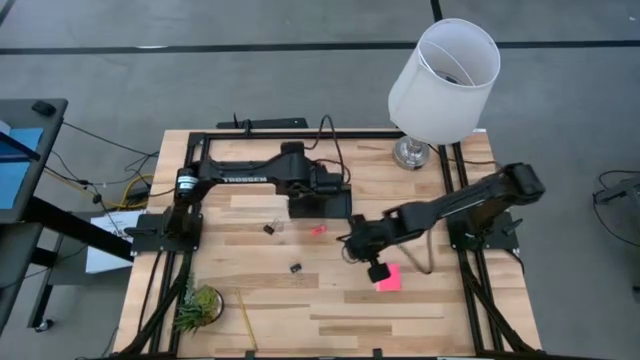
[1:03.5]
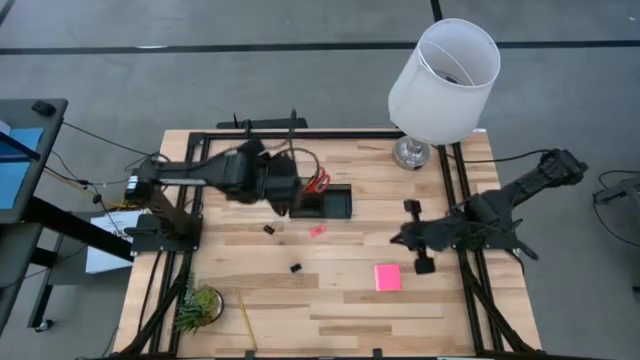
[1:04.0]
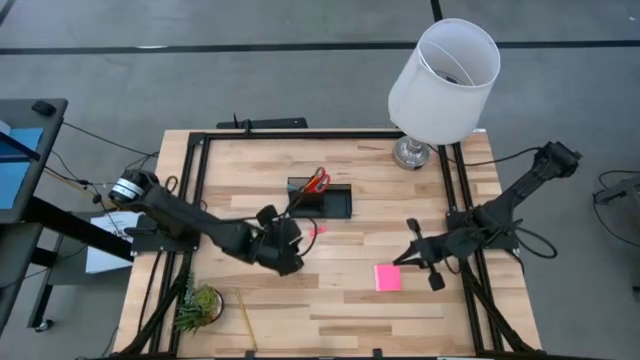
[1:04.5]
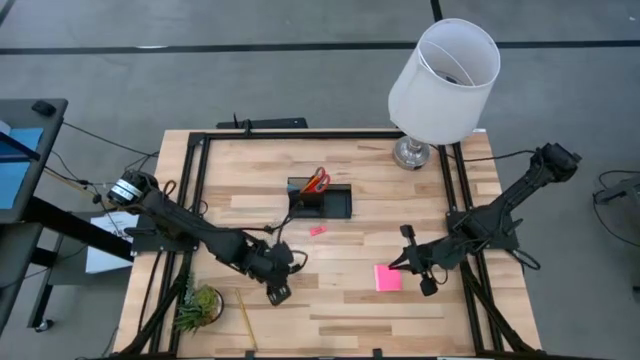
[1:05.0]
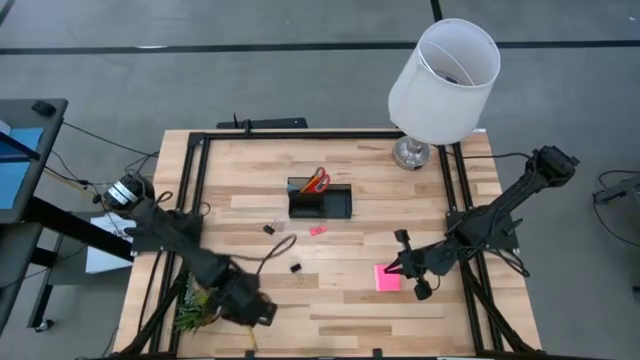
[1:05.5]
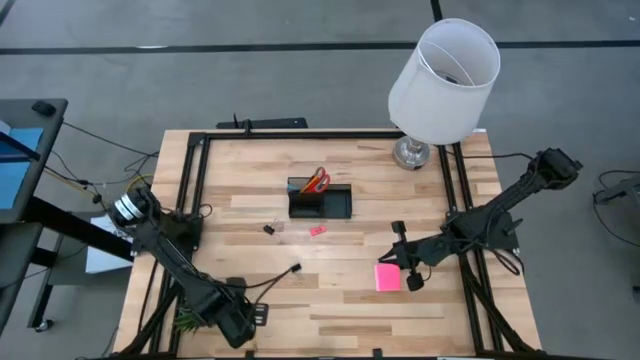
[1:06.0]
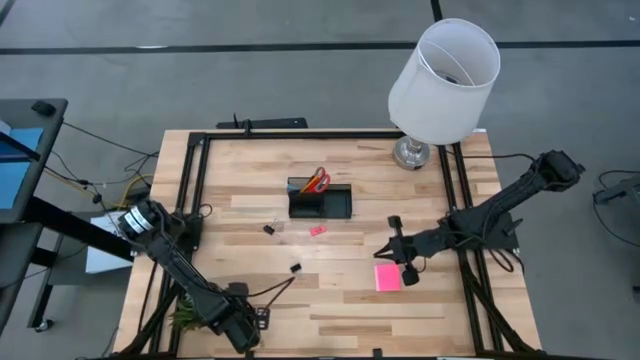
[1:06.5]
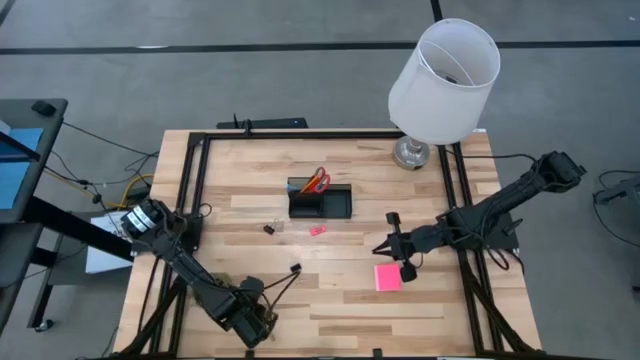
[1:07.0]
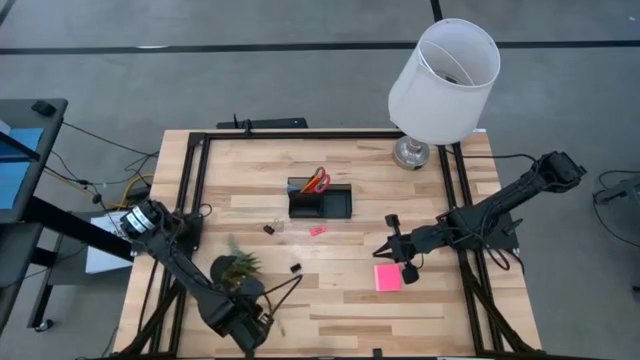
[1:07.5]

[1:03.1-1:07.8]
Task: Pick and place office supplies into organizer
Put the yellow pencil into the top left compartment of the black desk organizer

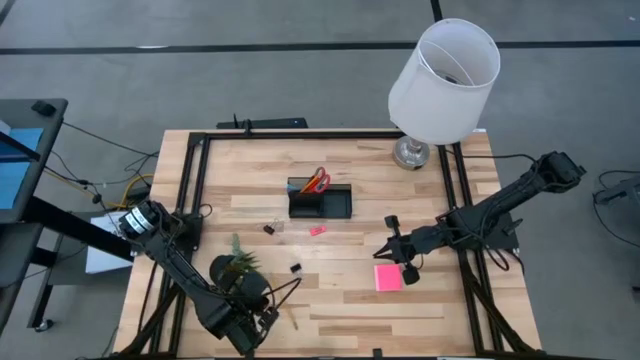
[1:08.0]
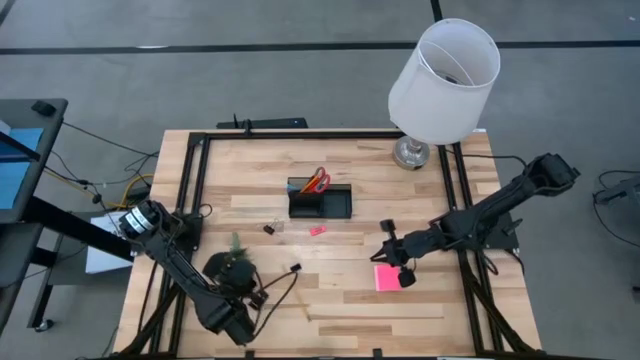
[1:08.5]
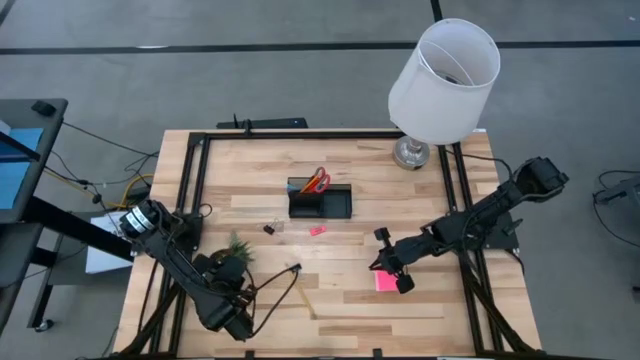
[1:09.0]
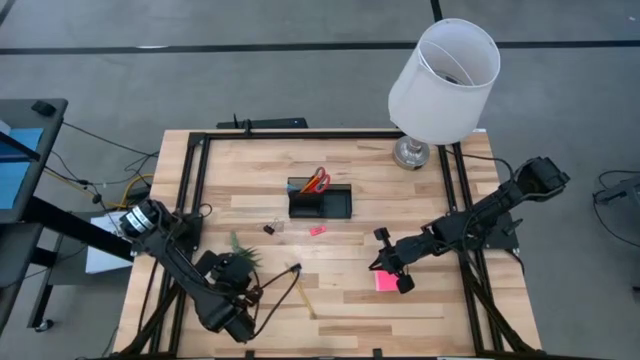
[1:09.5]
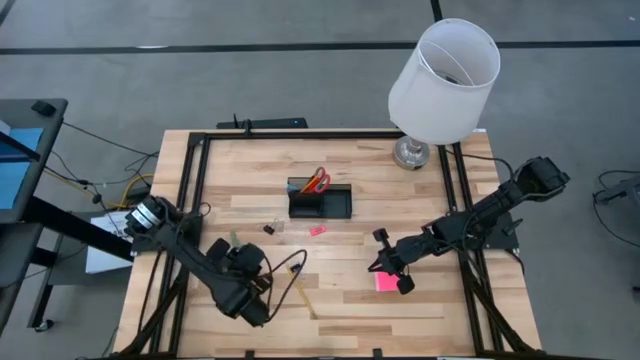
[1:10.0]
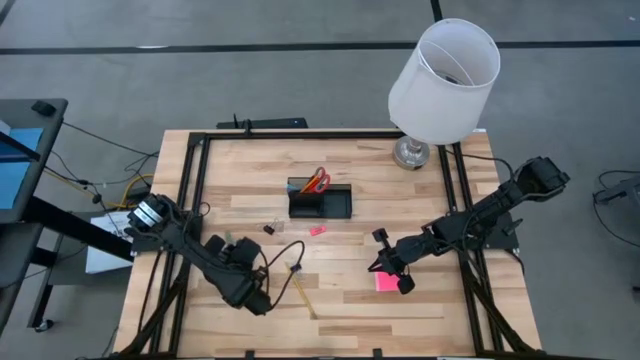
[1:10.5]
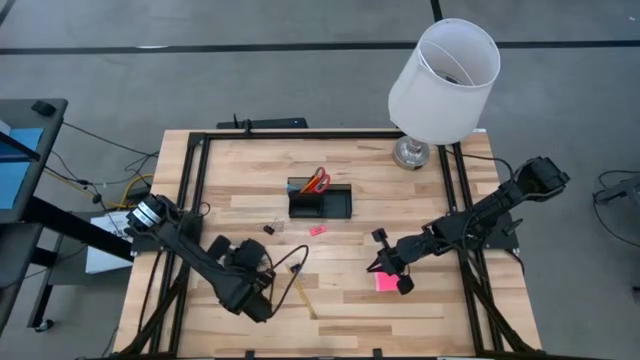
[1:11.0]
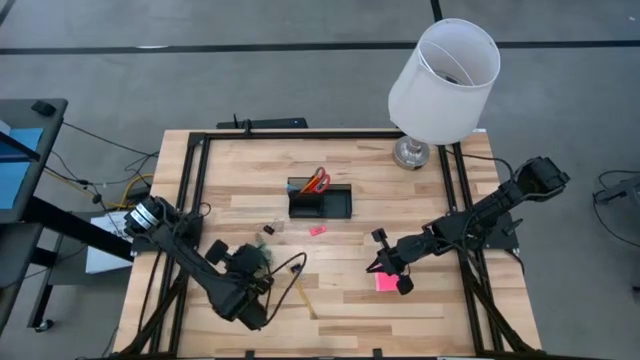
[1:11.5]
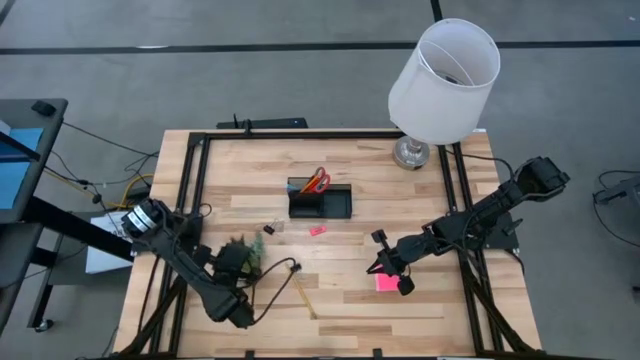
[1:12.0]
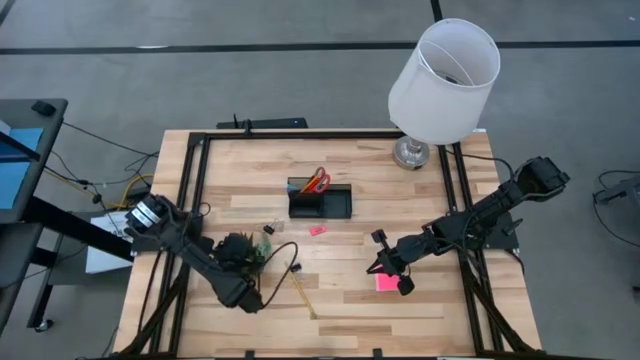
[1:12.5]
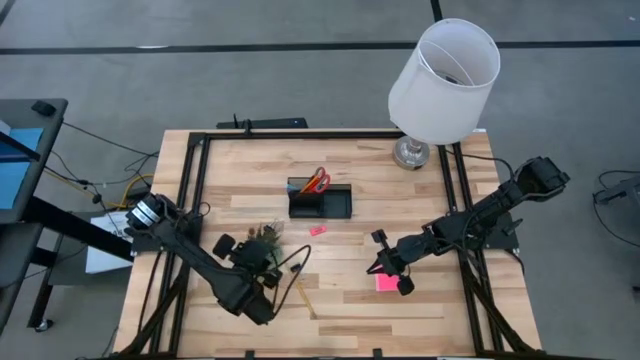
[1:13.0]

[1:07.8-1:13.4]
Adjust the black potted plant

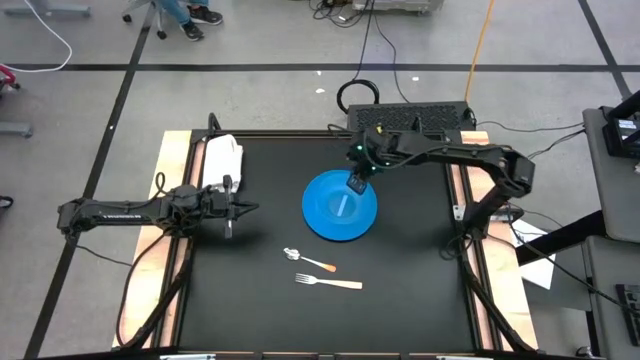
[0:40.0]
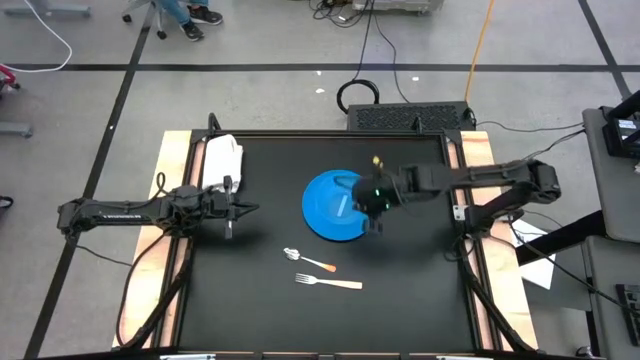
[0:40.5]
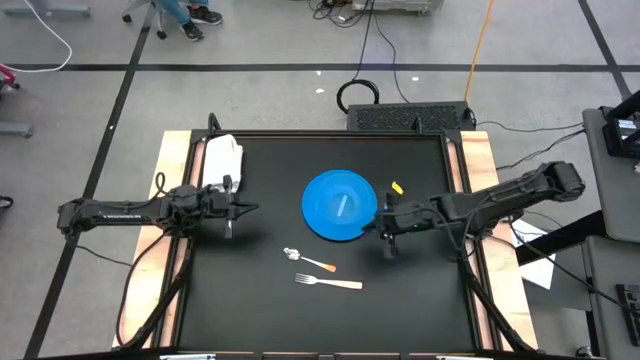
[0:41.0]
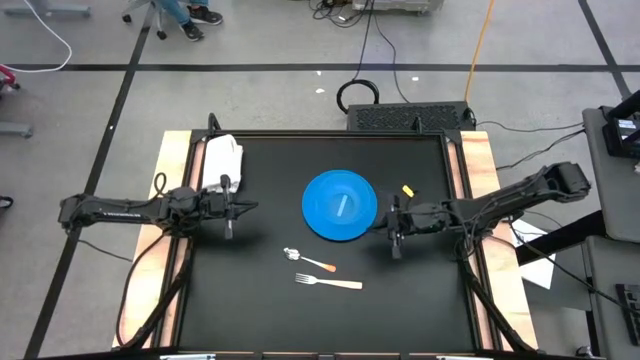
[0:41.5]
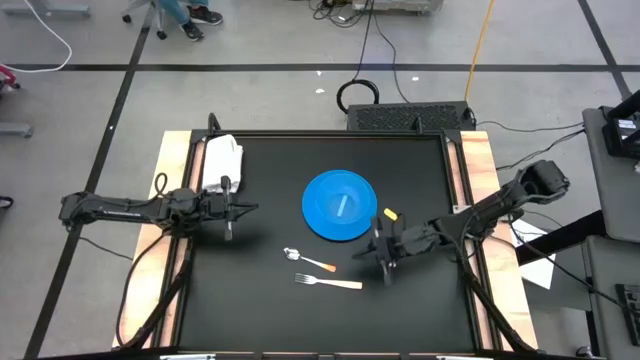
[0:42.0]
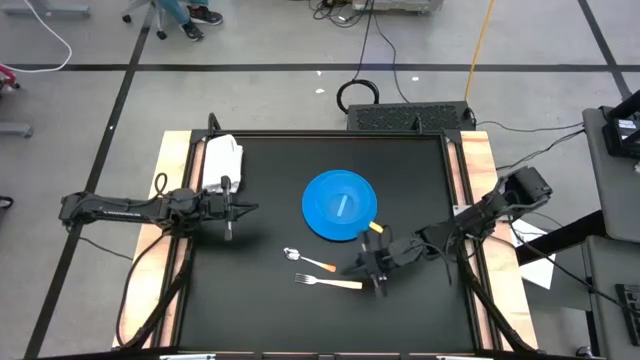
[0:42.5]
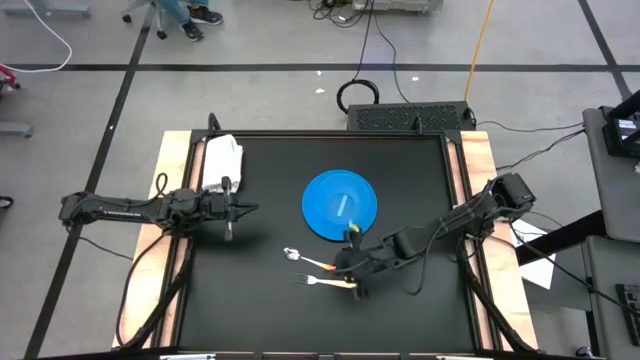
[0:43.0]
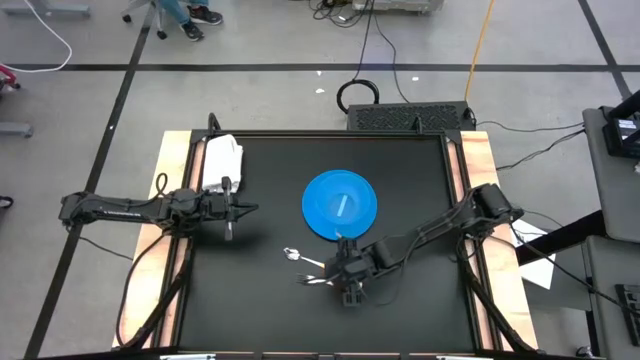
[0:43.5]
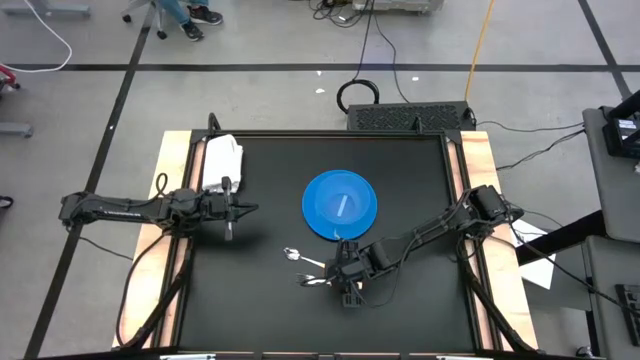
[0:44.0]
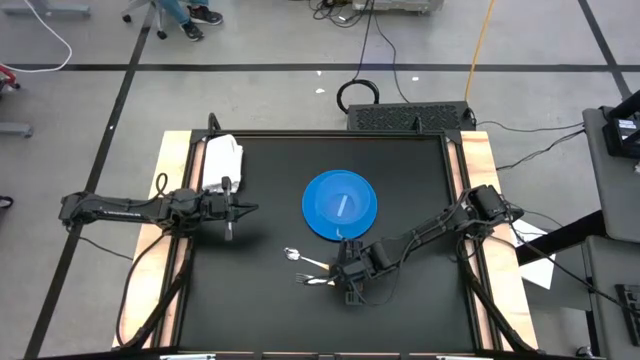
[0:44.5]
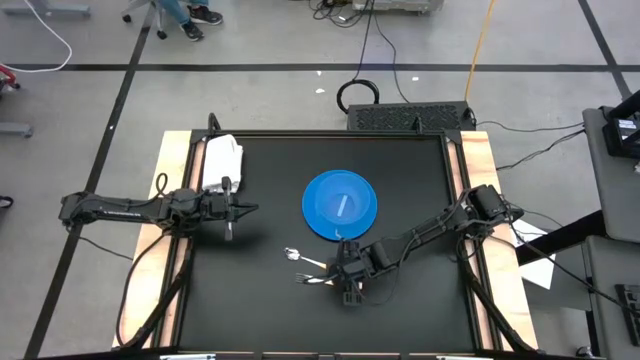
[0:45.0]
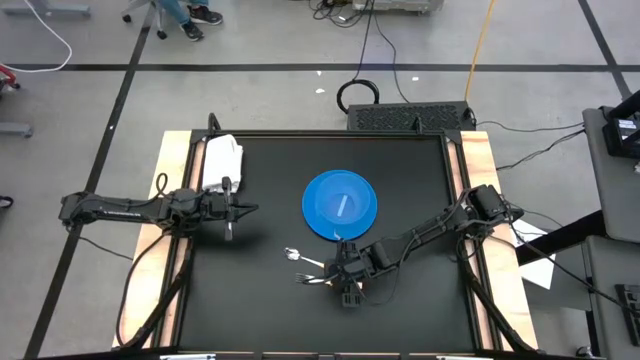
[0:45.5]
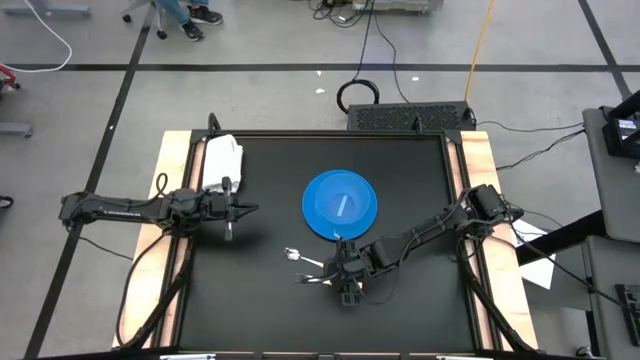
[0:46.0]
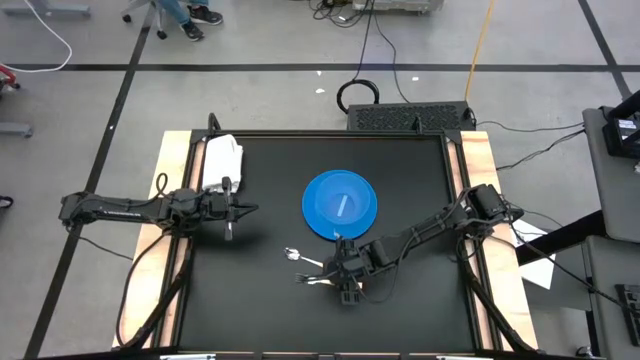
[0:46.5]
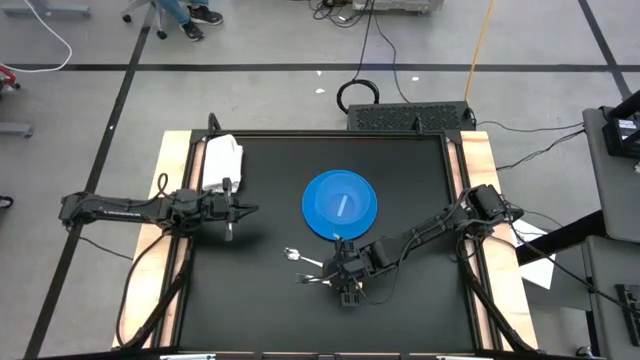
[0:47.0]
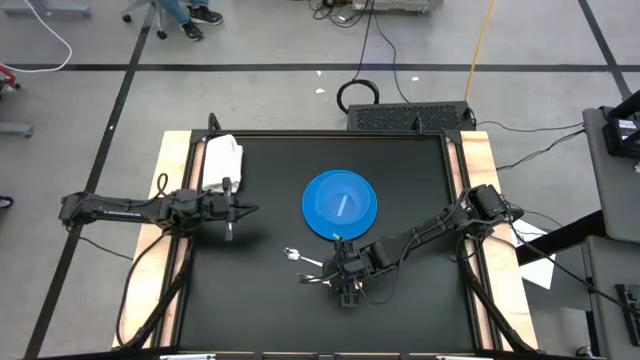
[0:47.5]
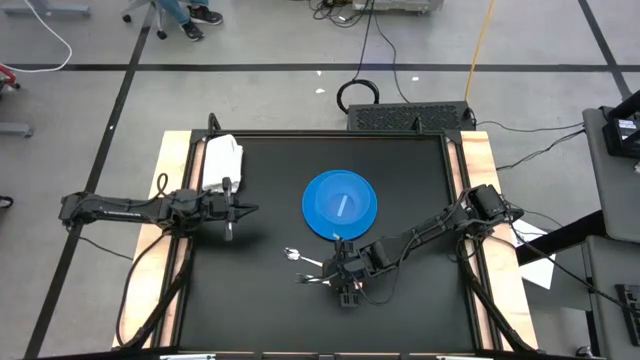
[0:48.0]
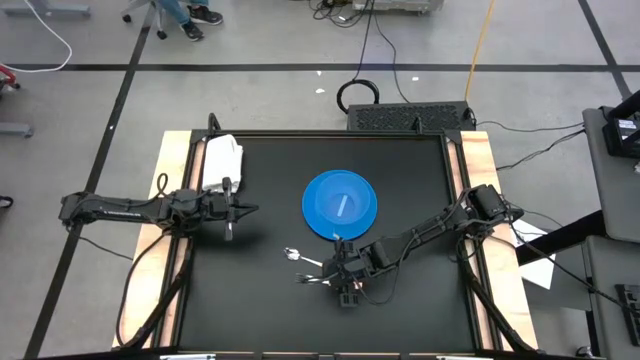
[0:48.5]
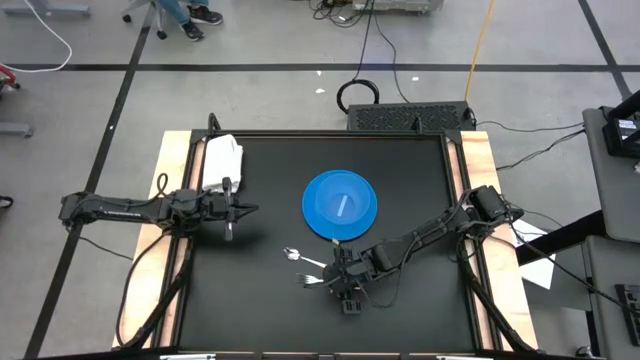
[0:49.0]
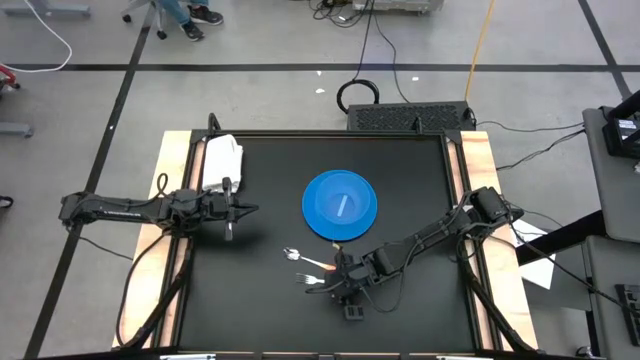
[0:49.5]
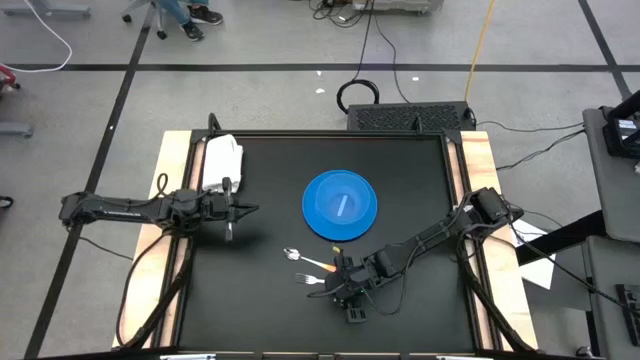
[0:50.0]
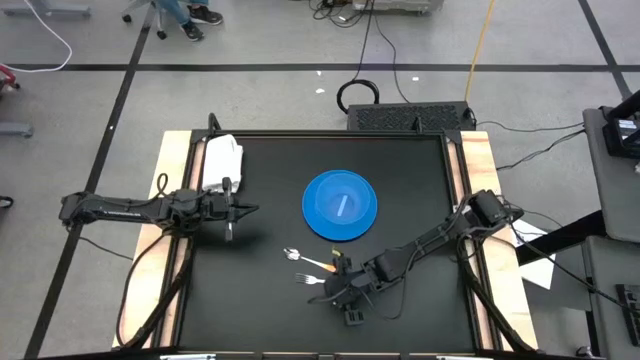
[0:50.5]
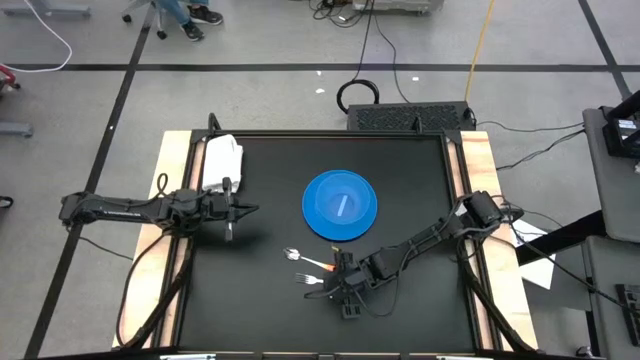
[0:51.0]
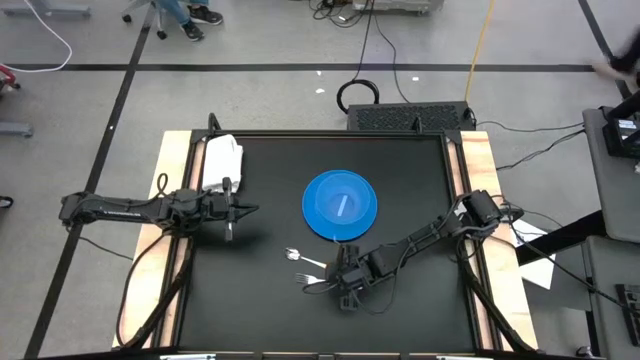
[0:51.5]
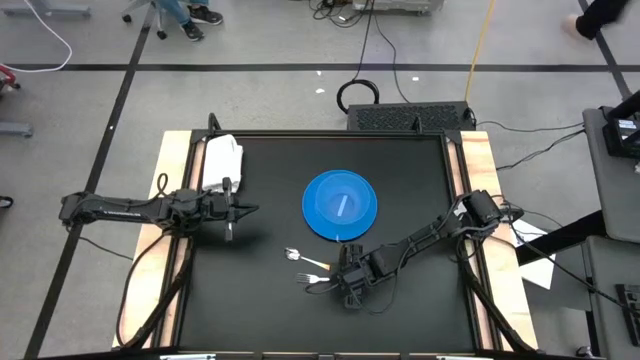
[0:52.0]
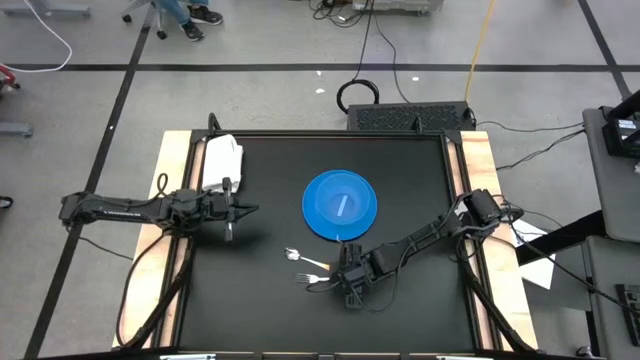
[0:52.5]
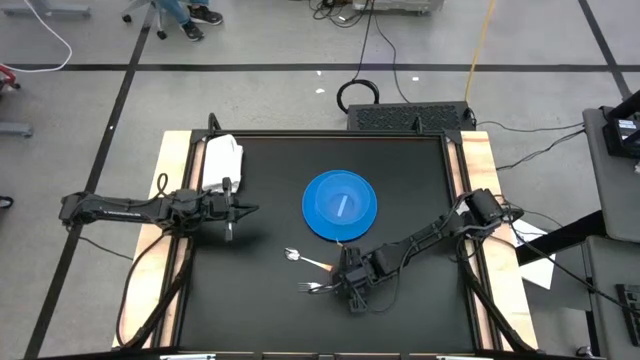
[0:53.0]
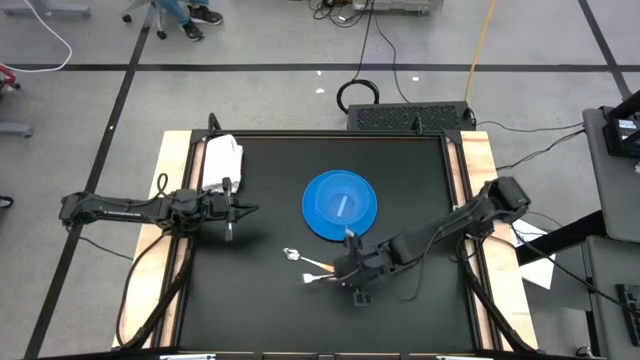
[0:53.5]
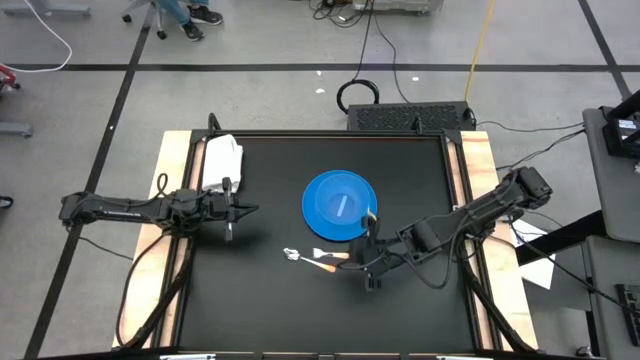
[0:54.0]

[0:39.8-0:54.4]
Task: Set table place
Move the orange fork from the bottom to the right side of the blue plate on the table
